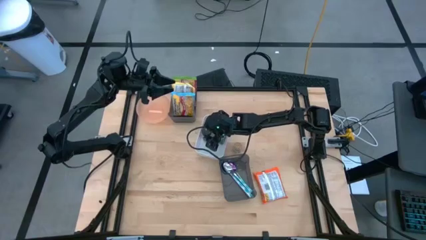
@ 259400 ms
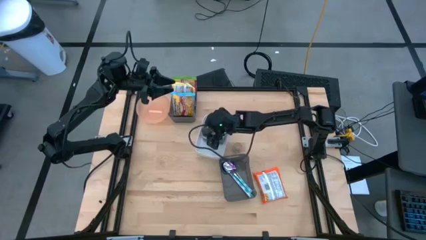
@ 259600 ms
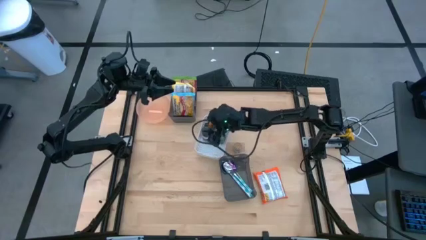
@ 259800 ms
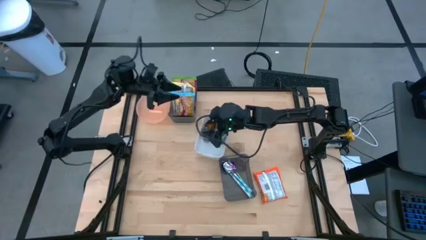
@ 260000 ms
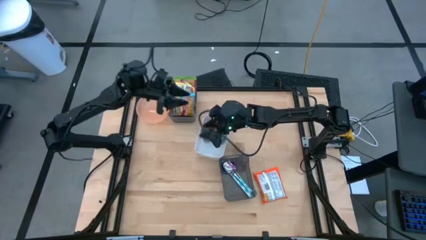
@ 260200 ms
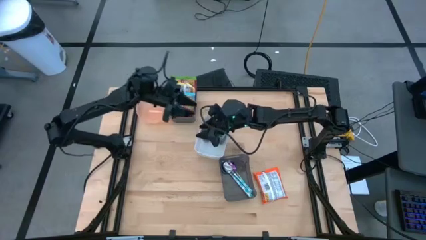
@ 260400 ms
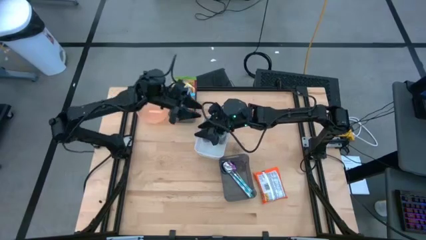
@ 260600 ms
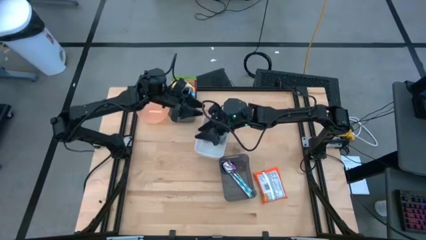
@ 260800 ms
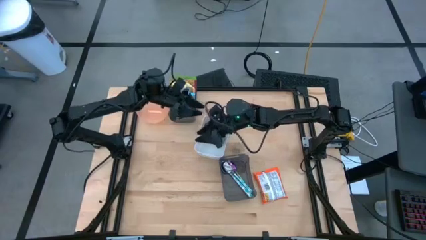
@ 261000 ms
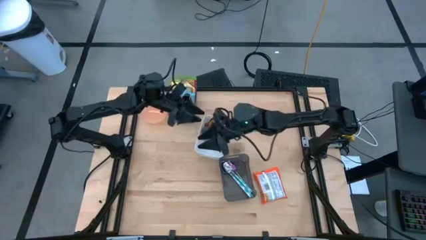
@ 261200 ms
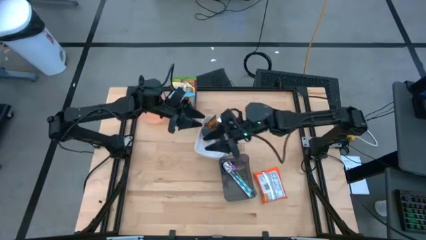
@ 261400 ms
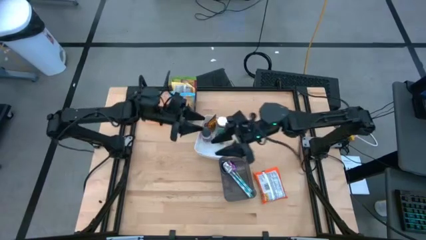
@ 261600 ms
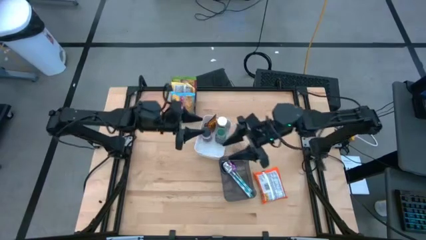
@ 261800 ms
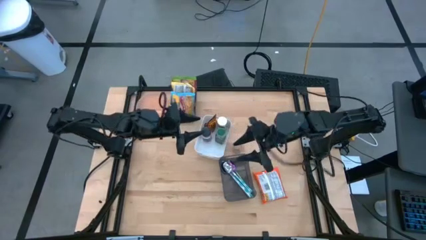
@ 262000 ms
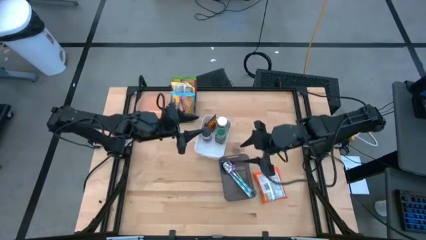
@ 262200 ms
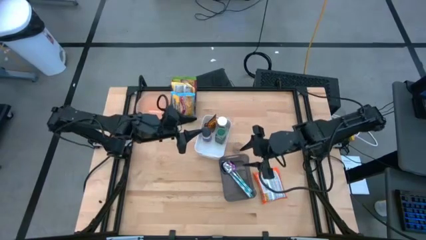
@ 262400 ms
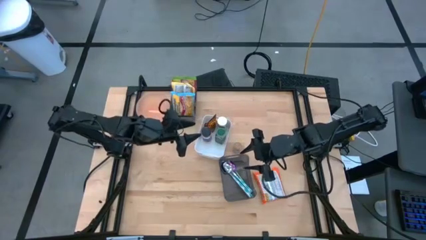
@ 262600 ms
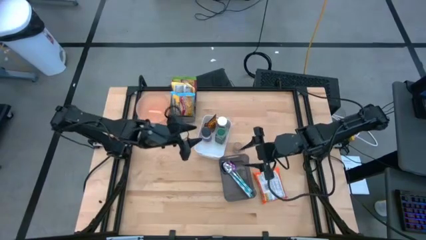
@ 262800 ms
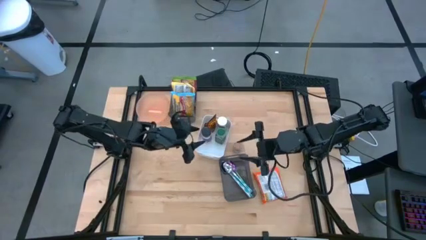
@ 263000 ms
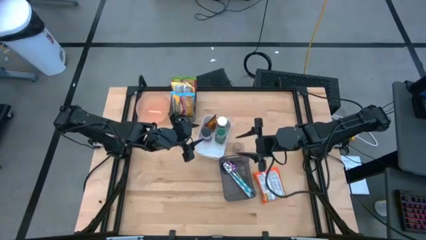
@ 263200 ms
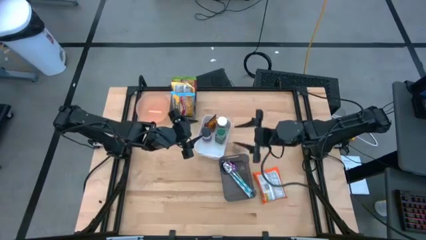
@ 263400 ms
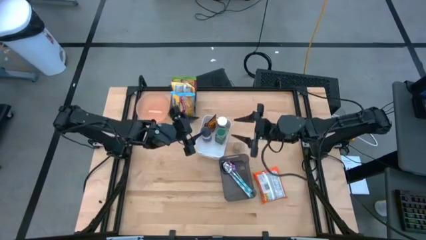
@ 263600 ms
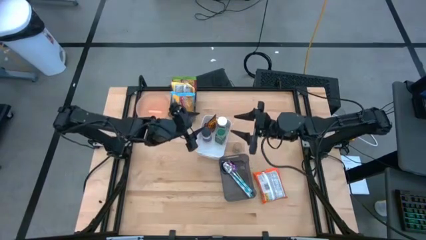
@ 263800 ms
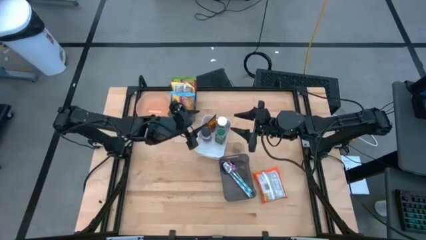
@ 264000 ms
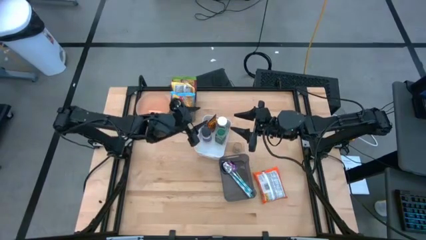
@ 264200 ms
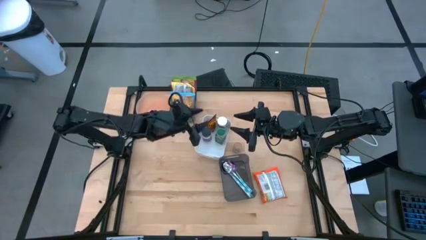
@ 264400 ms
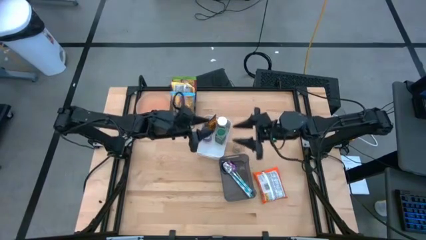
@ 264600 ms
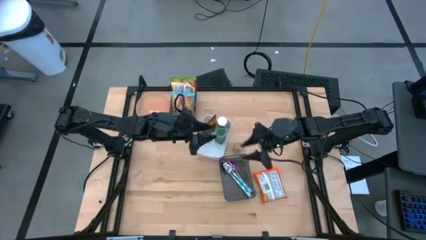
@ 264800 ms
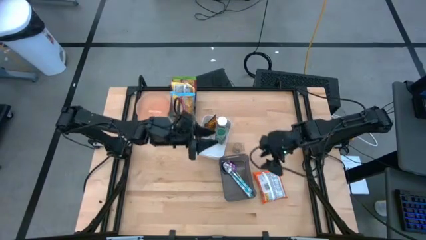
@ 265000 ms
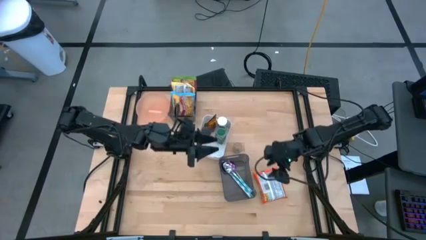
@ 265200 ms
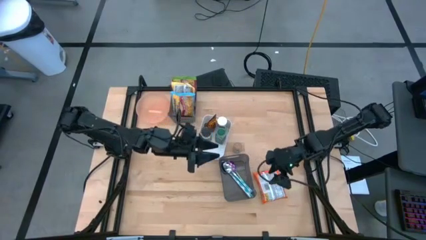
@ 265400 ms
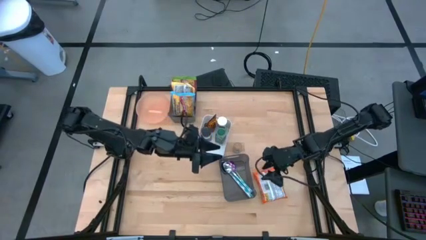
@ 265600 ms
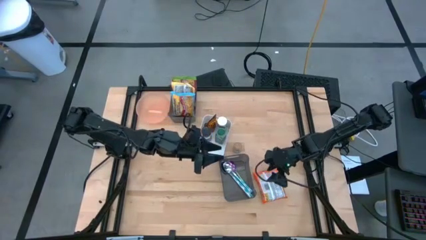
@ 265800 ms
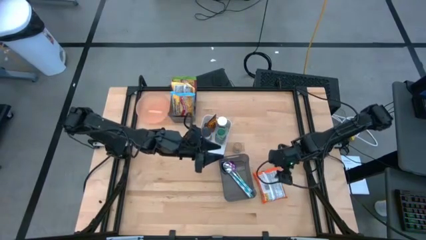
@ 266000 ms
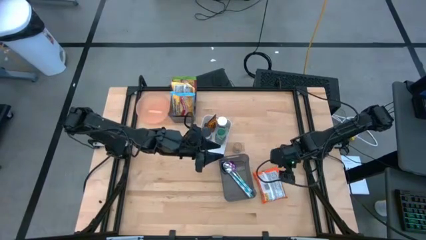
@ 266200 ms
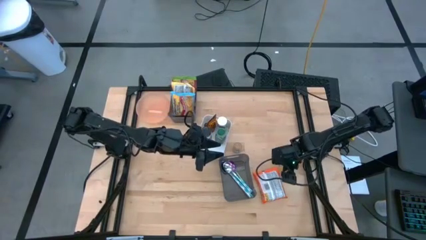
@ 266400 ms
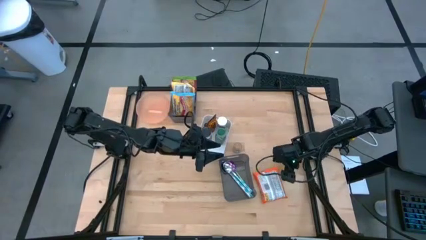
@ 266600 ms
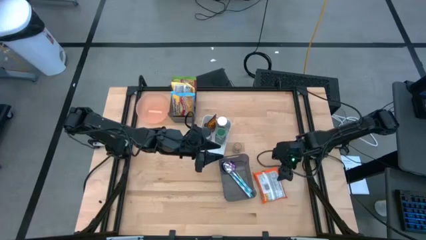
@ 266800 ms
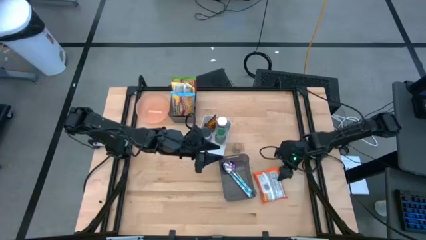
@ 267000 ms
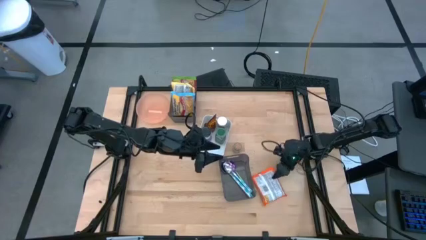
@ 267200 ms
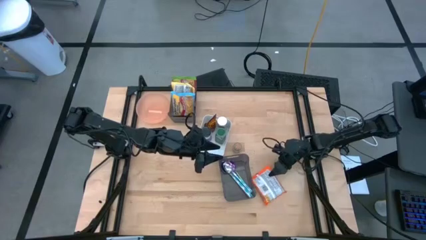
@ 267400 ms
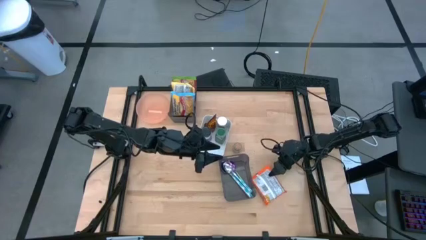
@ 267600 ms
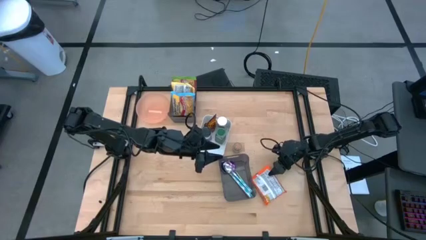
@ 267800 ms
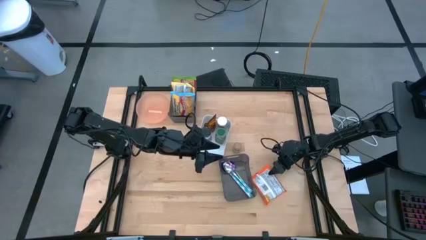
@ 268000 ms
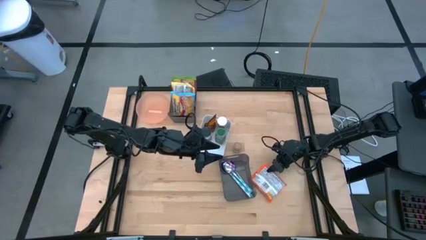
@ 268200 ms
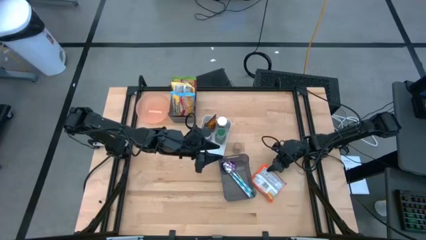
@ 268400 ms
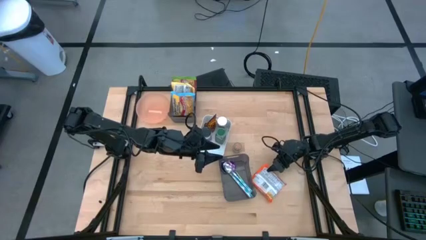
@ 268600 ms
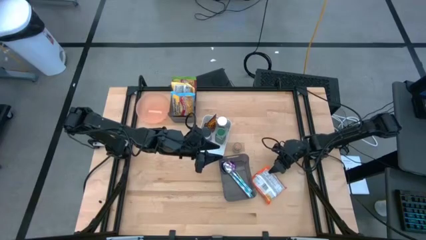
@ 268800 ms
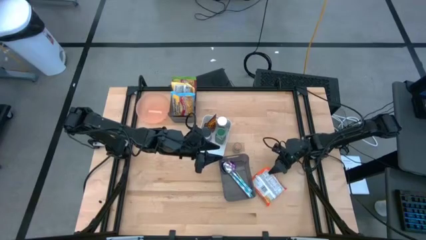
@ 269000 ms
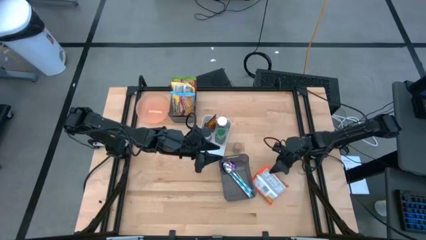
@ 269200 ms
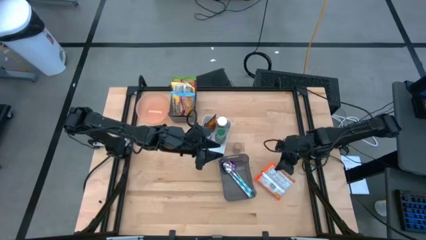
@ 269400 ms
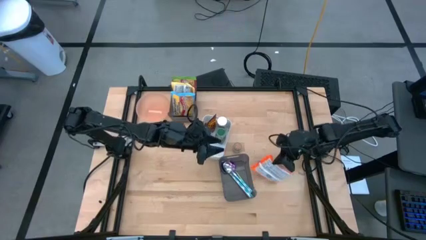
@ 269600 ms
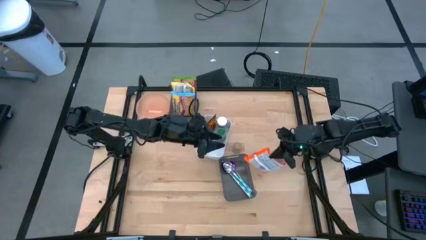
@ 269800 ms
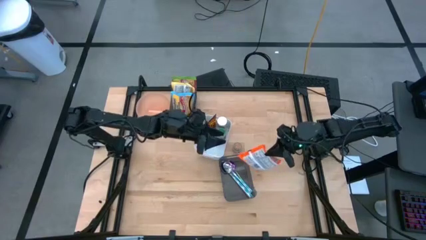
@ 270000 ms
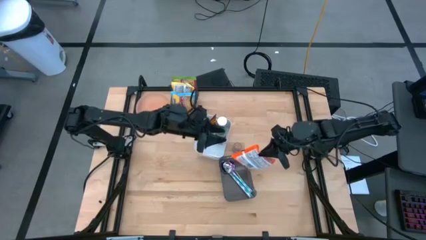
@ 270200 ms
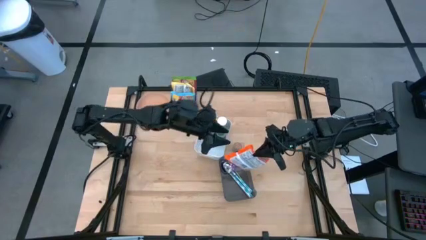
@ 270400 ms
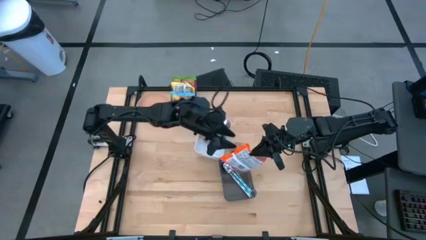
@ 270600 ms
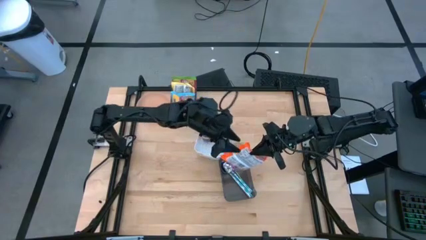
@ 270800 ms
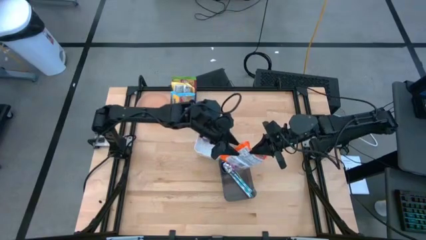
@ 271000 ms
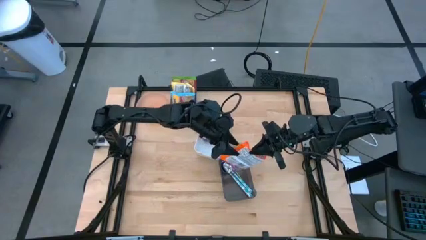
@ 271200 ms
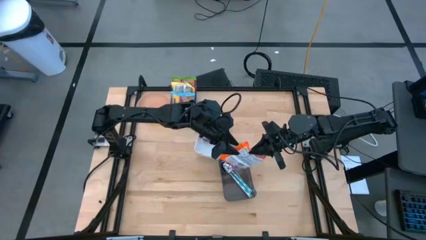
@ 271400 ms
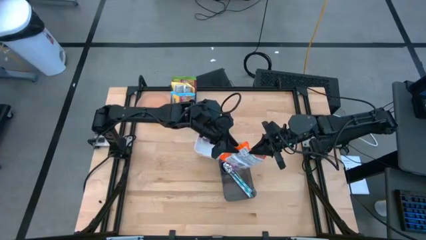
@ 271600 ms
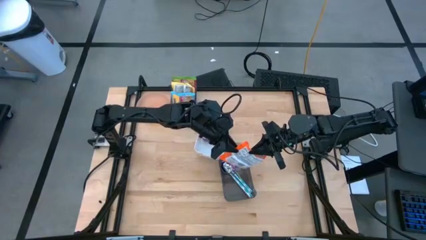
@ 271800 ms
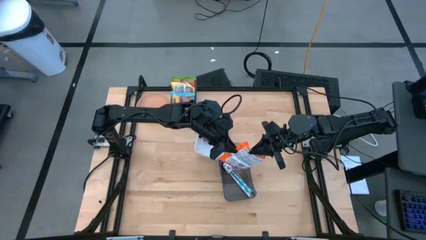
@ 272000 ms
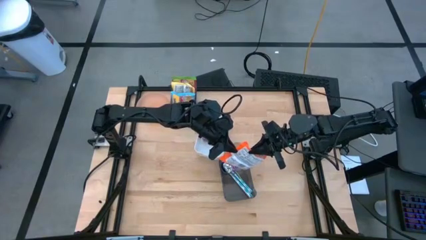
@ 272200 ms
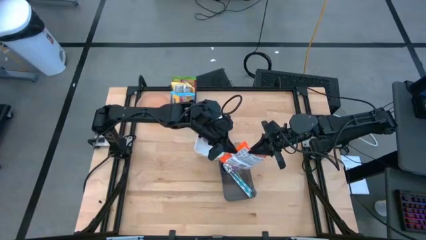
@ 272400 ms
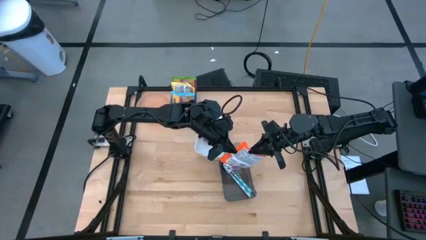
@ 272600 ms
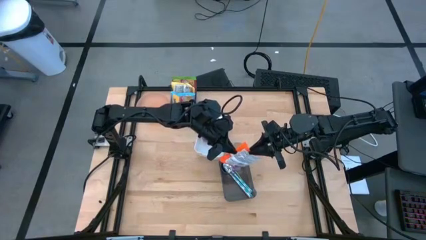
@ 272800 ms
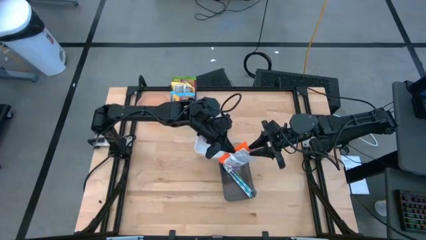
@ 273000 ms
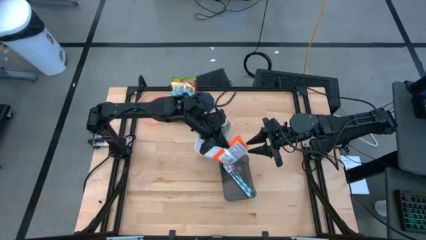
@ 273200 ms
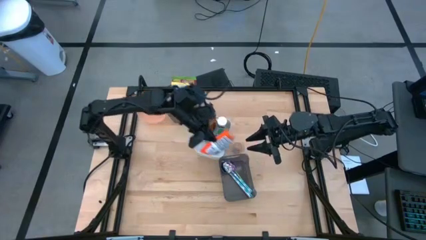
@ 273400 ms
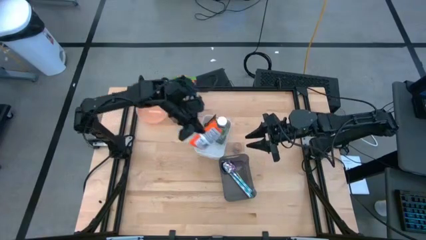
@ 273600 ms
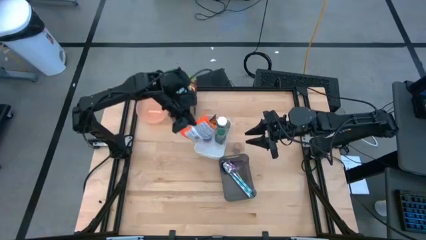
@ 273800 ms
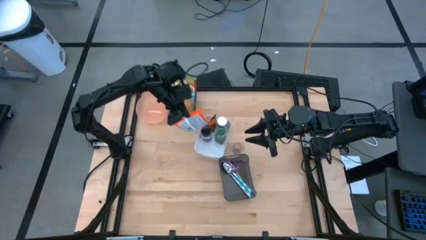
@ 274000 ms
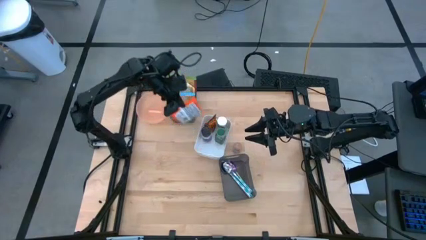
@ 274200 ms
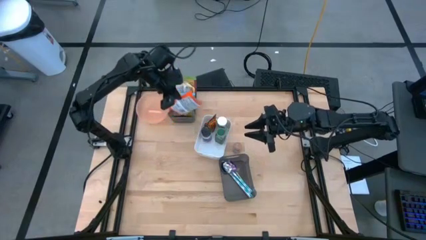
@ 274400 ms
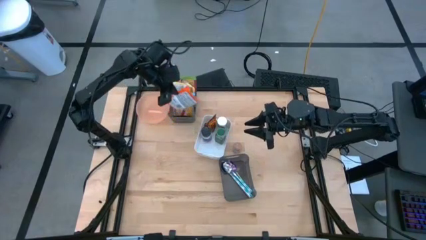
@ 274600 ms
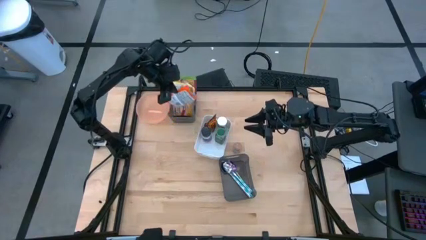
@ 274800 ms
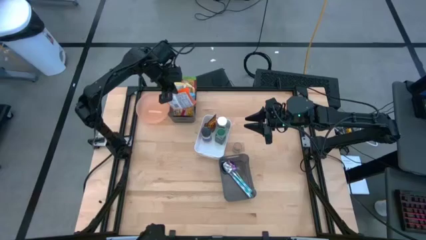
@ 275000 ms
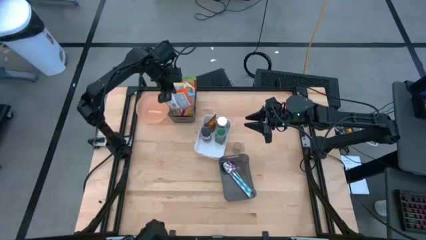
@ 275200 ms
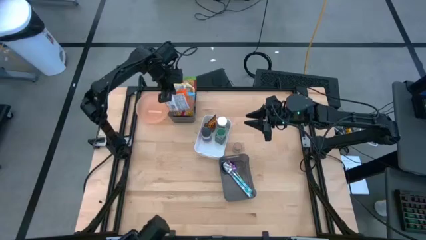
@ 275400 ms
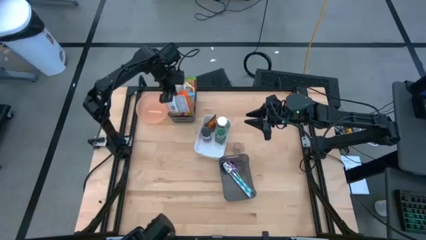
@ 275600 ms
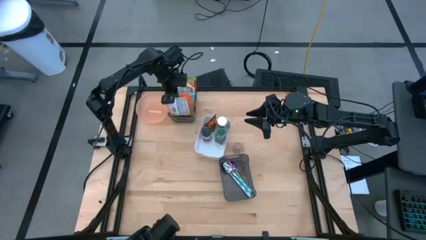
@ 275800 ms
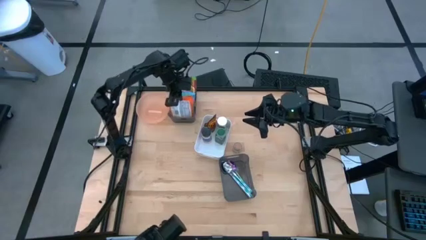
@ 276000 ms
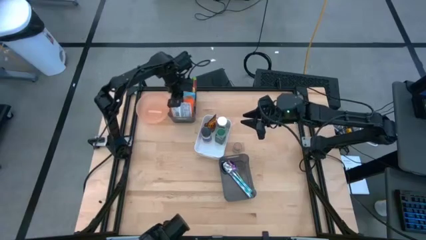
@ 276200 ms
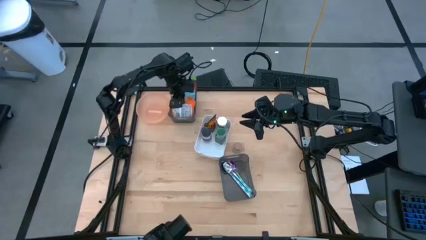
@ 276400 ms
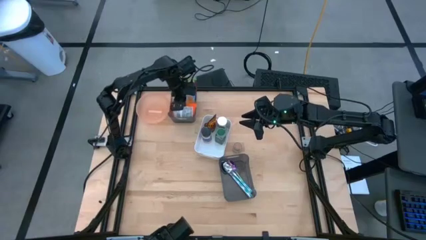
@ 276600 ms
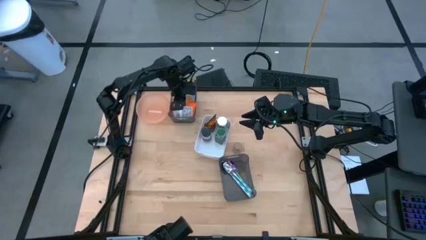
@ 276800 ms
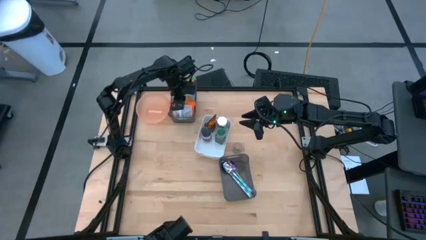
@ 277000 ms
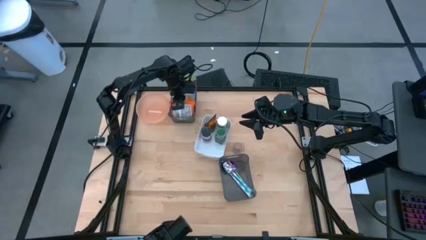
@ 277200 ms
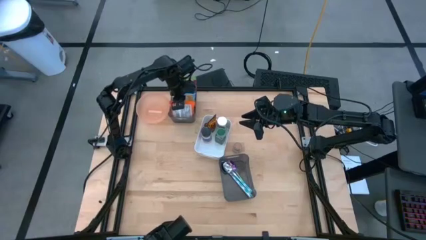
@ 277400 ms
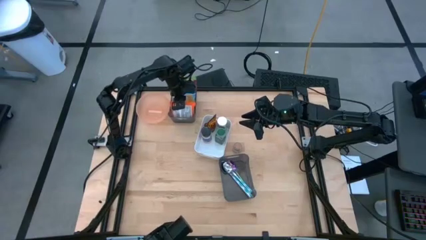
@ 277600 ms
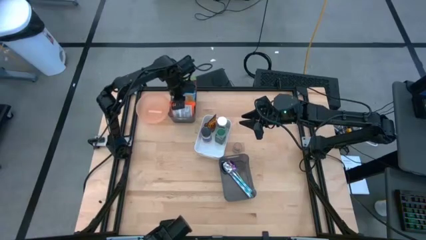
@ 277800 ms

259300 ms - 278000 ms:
Task: Pick & Place Food Item
Put the orange noodle pack into the top black bin
